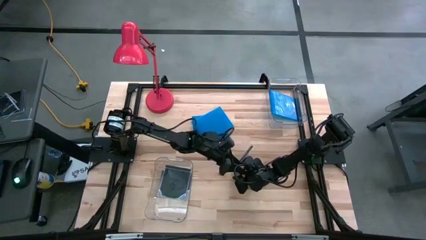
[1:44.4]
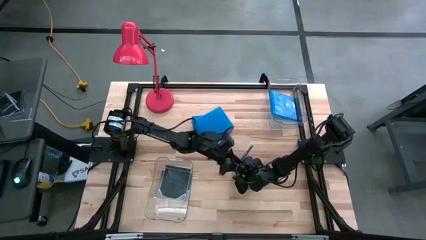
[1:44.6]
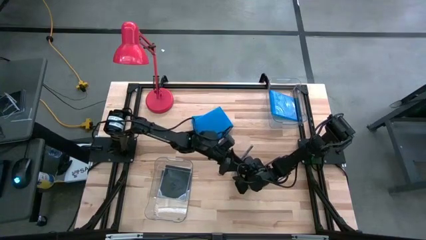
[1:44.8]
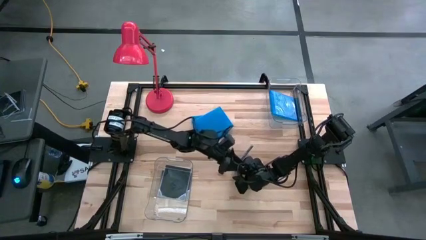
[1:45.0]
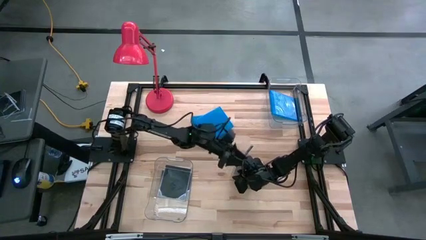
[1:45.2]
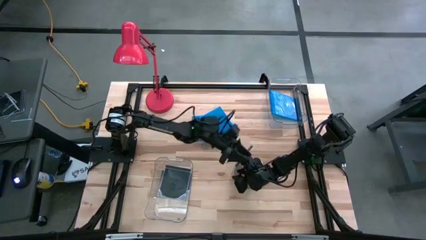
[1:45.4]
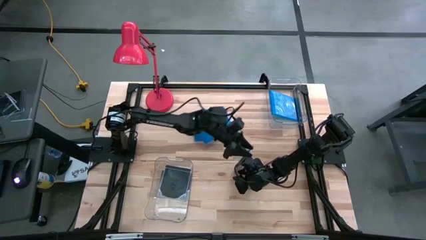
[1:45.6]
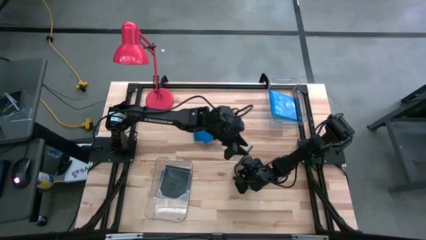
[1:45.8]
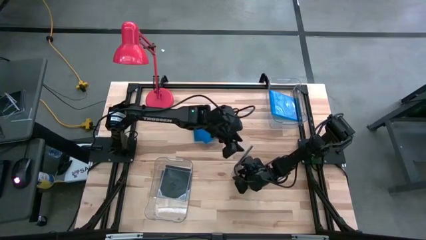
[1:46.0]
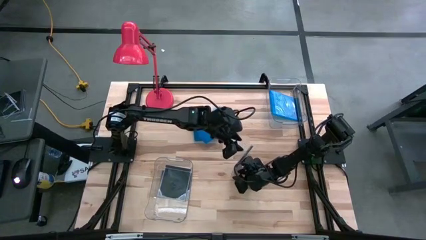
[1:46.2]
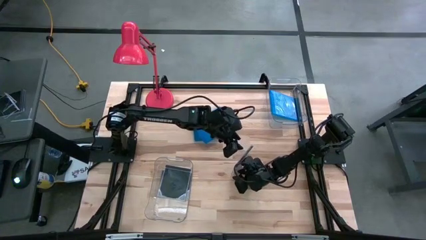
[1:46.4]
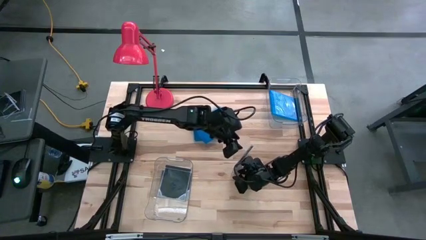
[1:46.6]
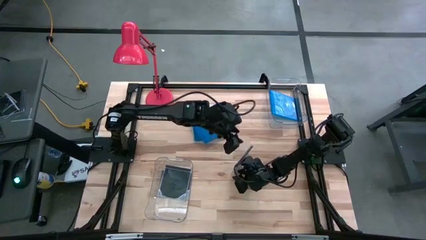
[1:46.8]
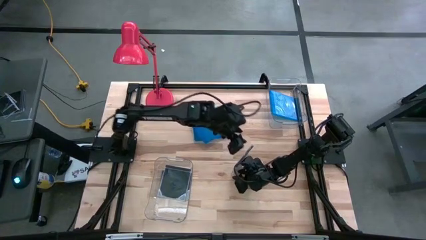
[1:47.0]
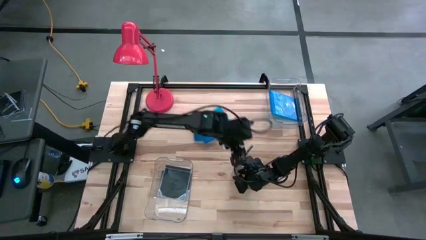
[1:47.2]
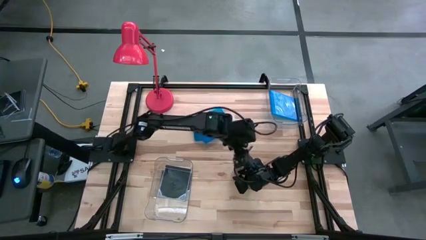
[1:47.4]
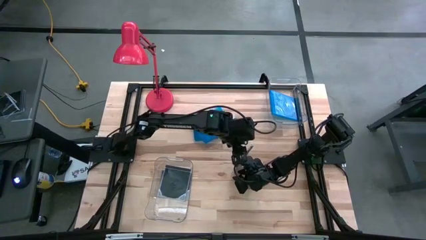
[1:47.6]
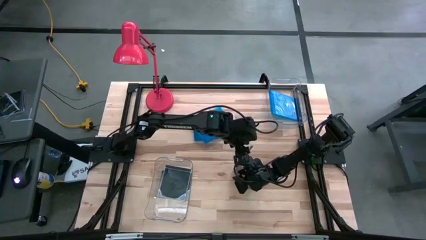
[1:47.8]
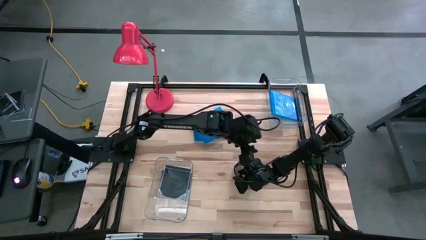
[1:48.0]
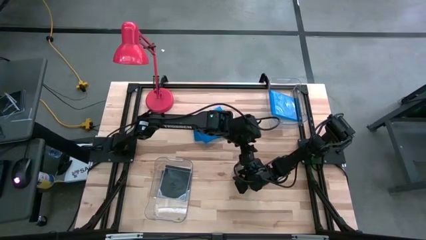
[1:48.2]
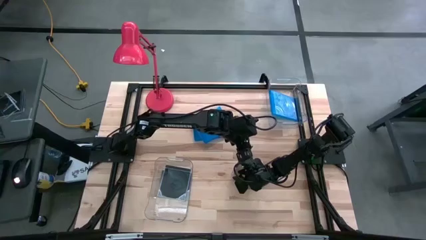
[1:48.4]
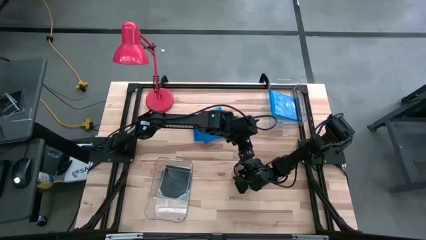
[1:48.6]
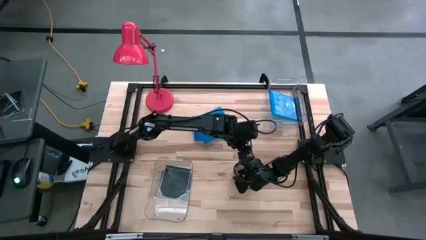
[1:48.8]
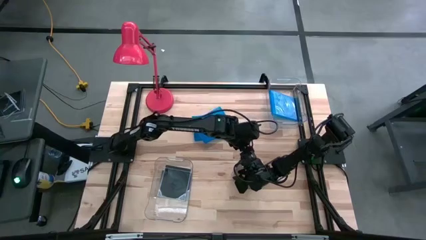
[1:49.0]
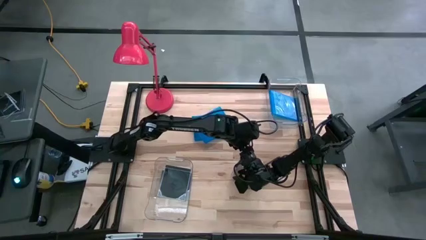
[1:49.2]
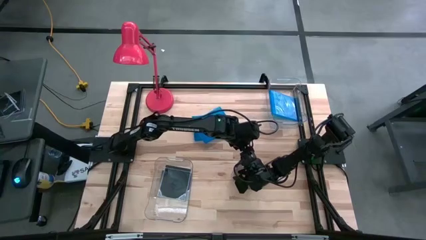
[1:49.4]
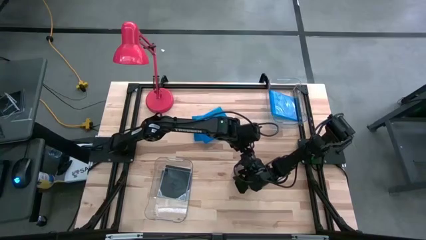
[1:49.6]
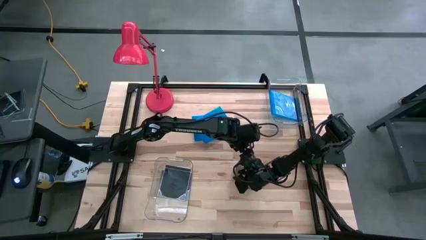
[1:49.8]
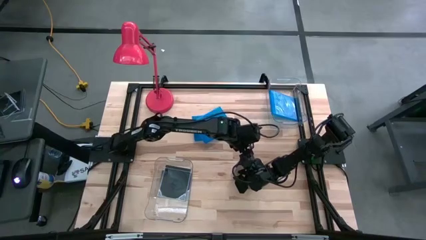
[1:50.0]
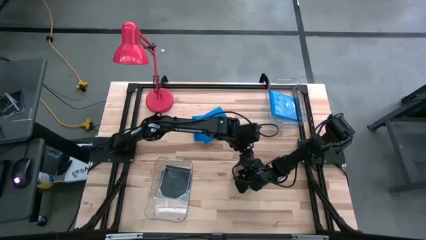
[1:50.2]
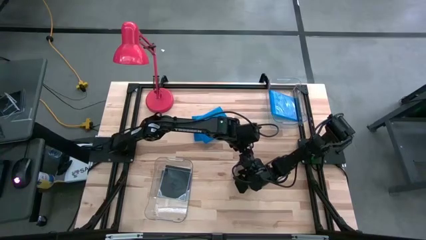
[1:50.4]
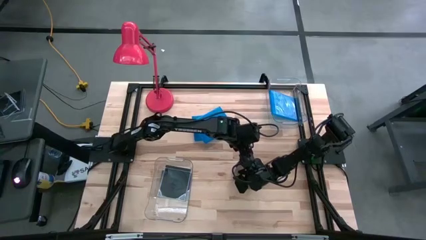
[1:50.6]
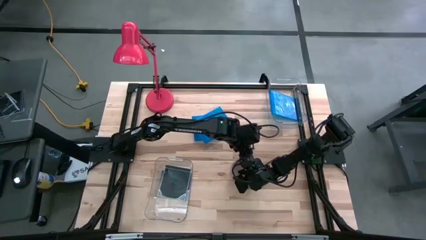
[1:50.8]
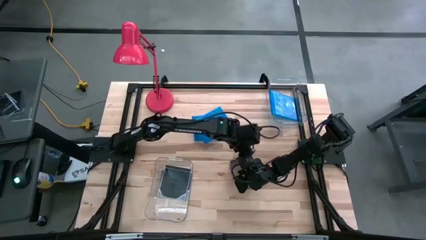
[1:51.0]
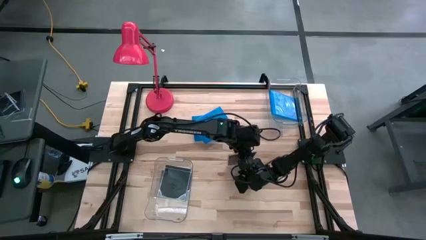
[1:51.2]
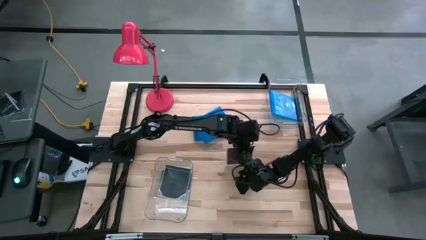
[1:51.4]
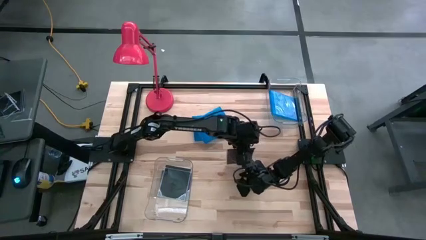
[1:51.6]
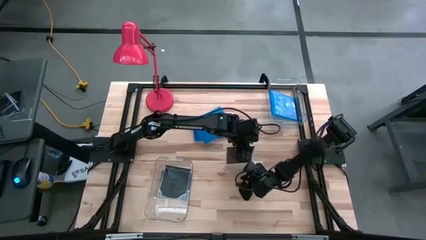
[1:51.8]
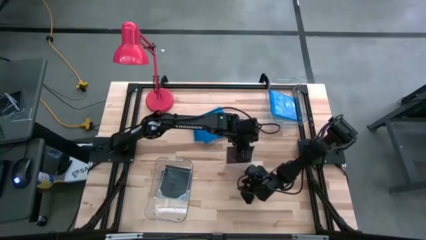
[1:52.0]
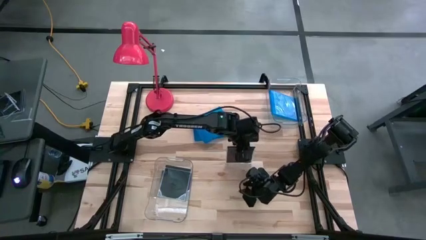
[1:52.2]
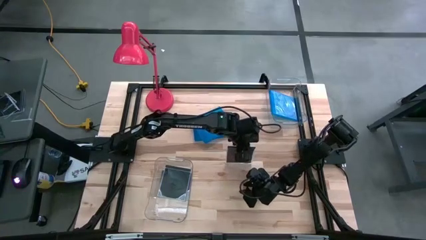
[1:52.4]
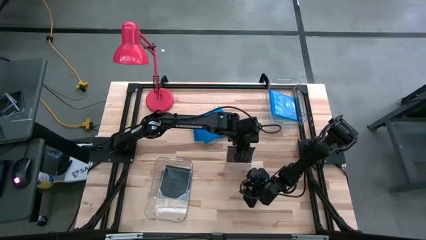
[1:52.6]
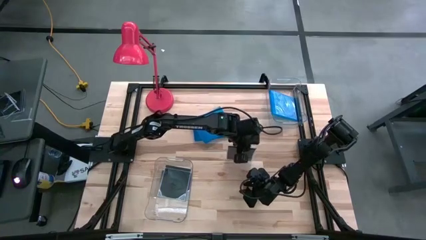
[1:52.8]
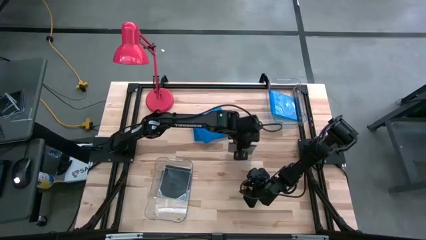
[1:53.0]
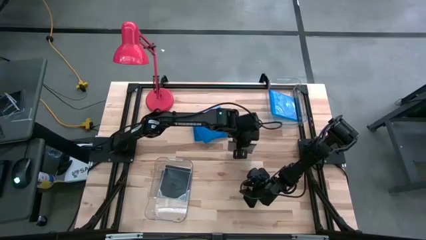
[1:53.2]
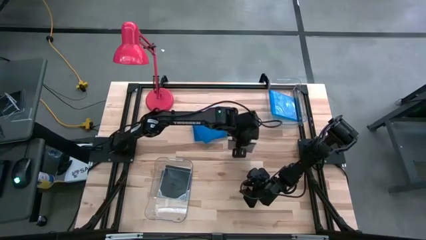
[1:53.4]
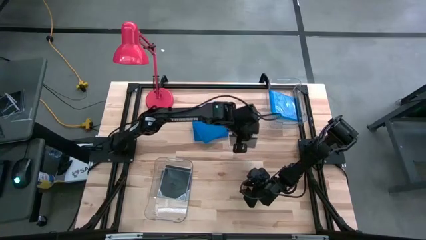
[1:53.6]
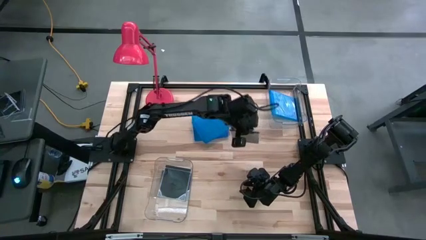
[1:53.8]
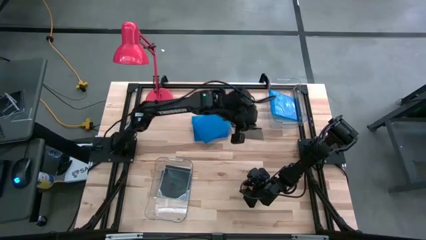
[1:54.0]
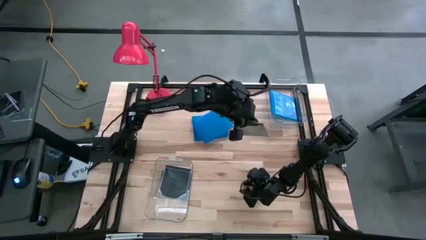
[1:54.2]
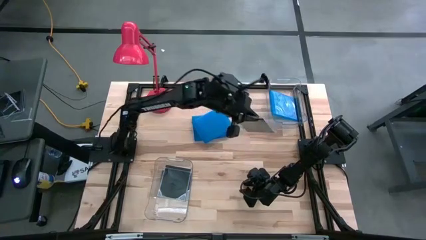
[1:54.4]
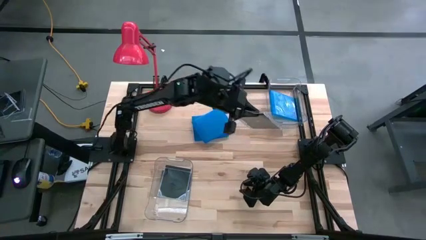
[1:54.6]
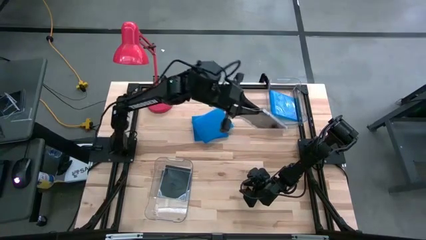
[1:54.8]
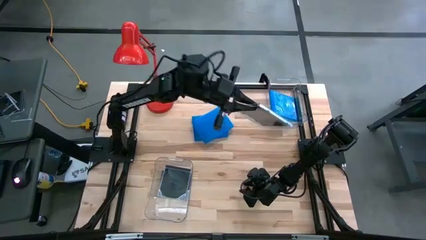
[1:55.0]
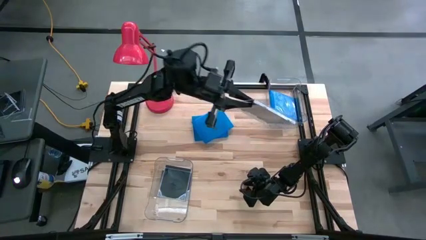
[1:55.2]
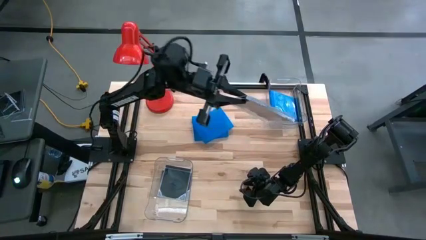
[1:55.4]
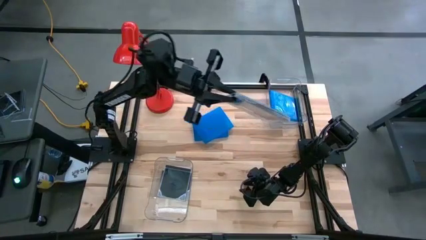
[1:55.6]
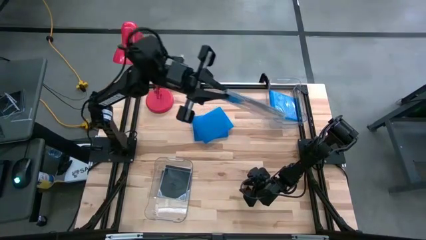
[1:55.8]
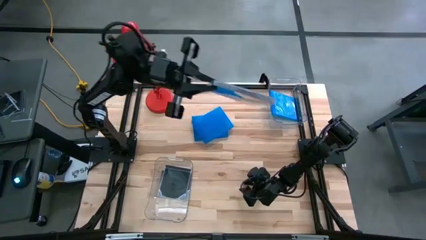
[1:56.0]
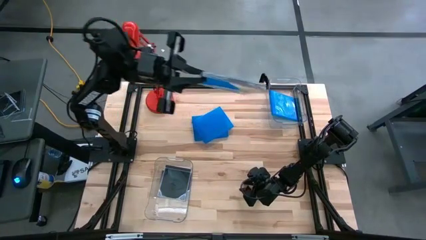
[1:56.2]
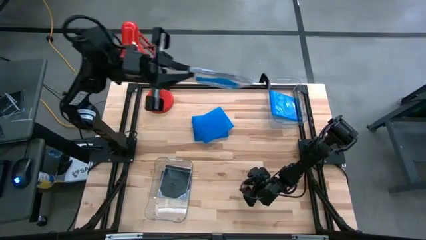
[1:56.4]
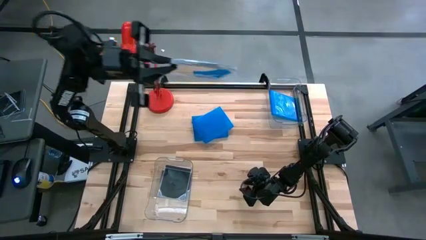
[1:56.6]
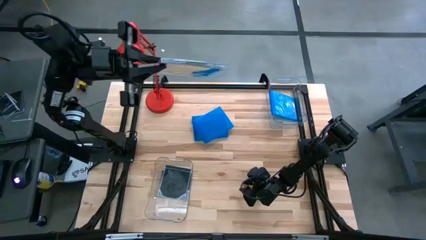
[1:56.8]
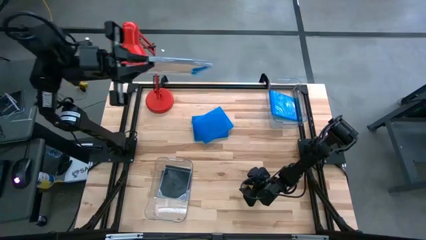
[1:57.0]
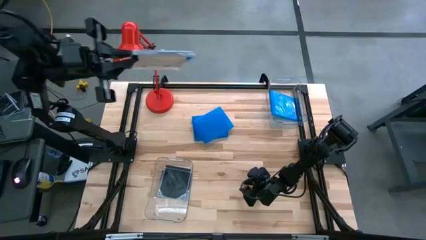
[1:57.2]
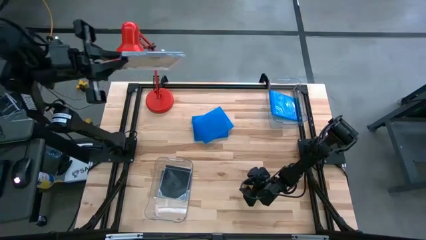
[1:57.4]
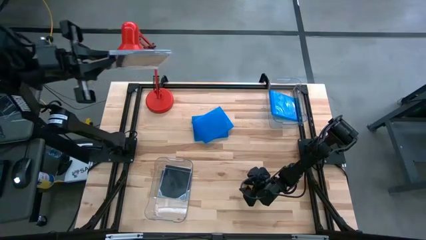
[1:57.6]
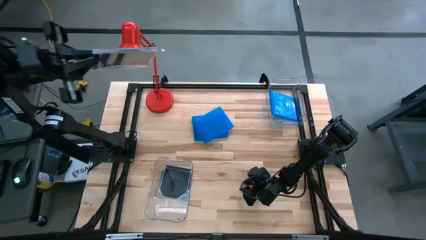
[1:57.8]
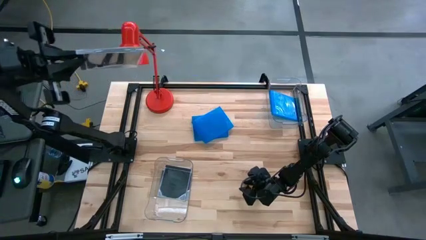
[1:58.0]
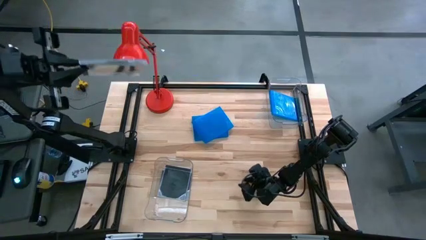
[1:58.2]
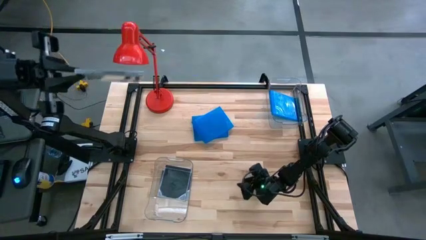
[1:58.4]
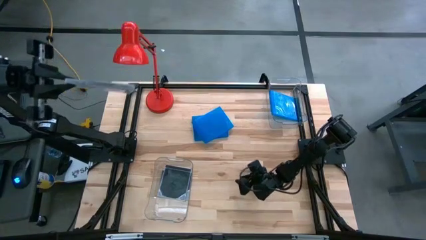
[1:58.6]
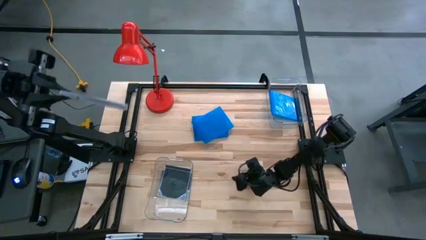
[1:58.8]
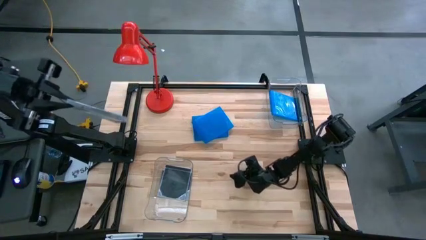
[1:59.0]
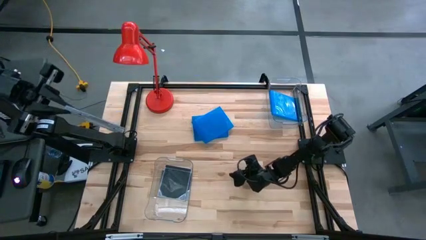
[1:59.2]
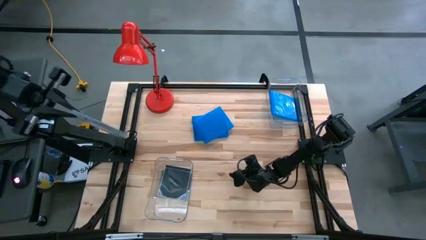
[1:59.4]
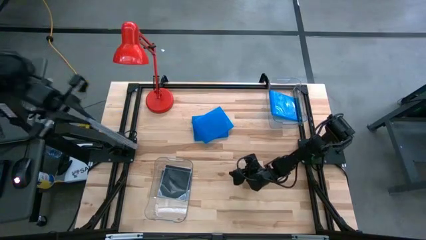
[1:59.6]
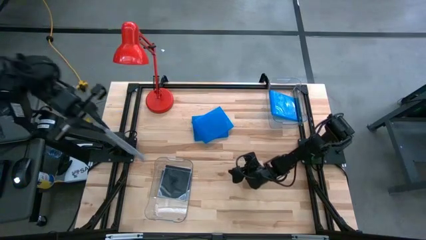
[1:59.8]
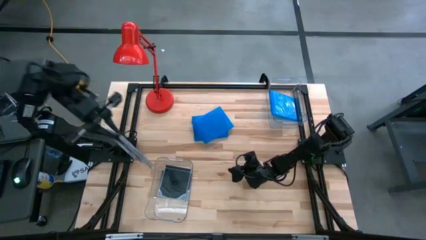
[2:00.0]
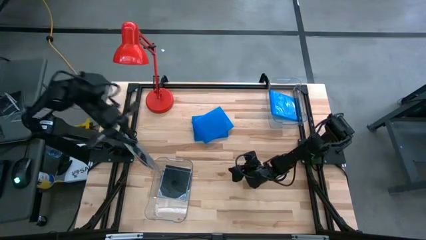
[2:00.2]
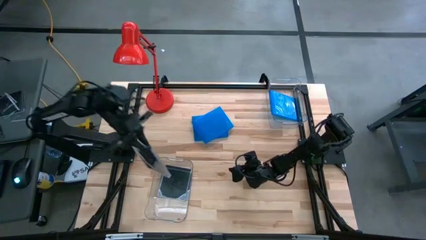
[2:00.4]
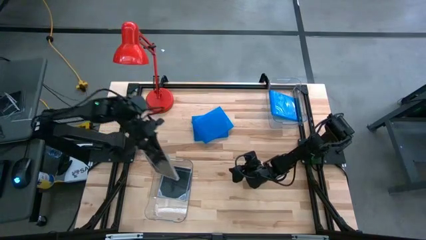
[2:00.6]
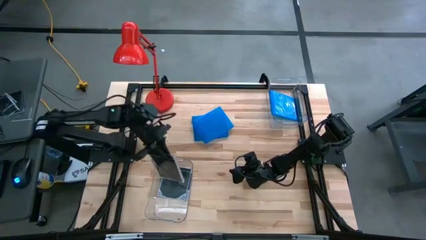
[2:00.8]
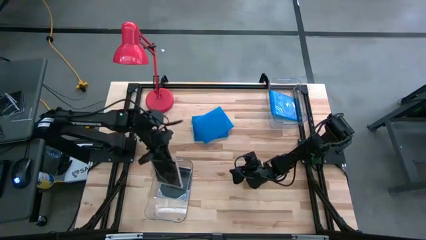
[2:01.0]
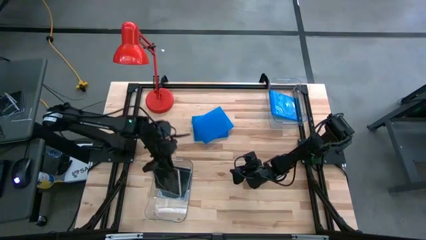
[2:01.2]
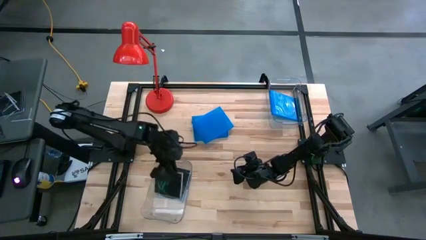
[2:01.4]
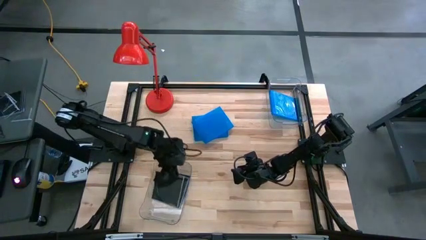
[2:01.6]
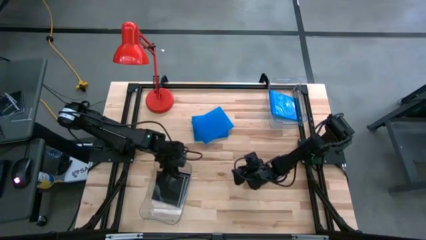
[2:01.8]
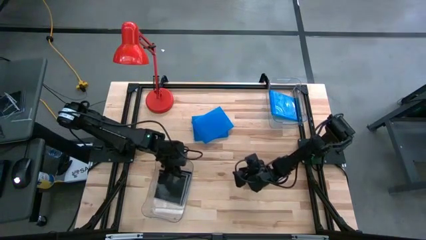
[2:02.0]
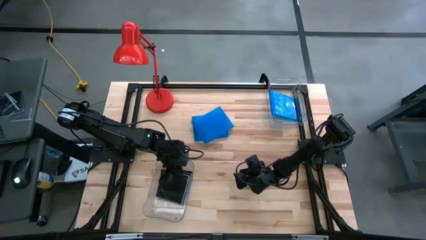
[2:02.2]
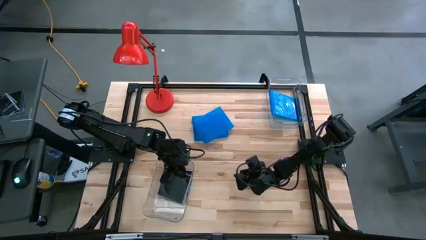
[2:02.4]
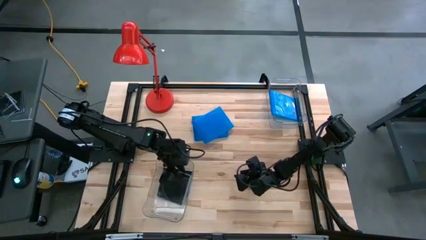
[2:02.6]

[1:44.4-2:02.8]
Task: Pick & place jewel cases by type
Put the black cd case into the bottom transparent bin
